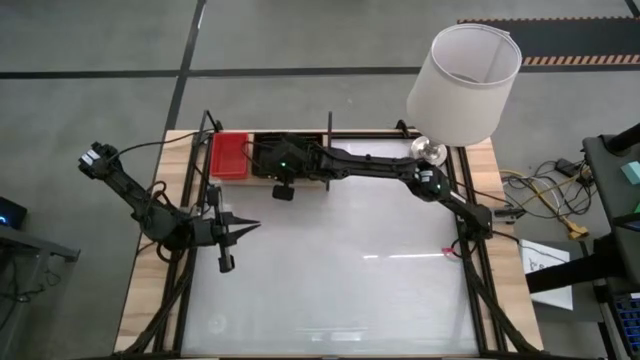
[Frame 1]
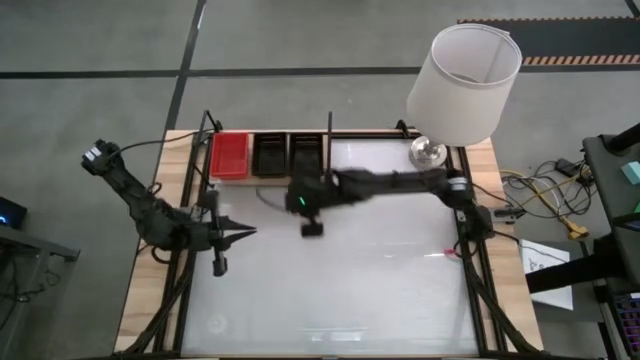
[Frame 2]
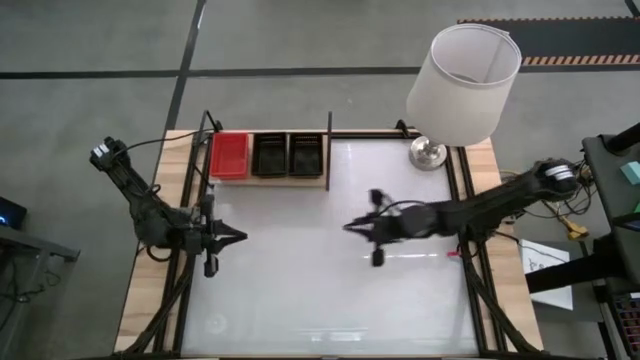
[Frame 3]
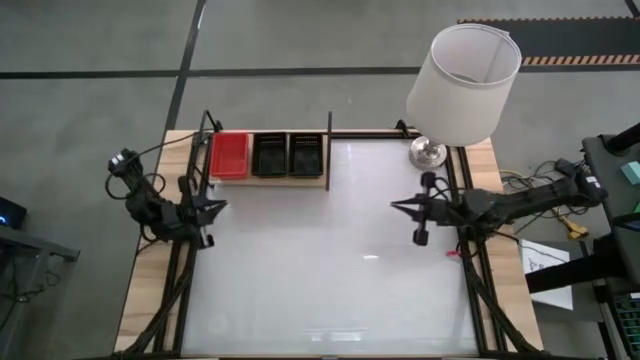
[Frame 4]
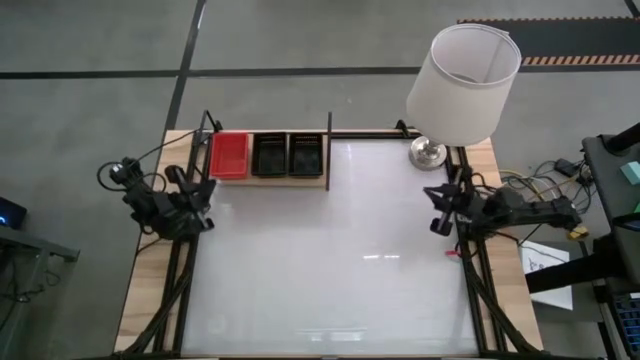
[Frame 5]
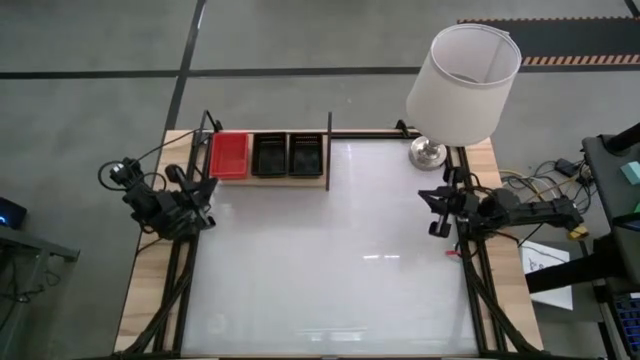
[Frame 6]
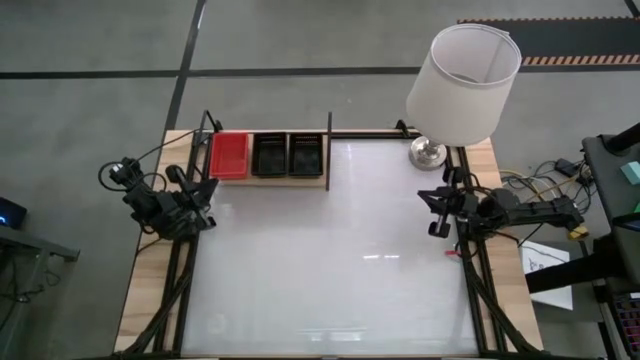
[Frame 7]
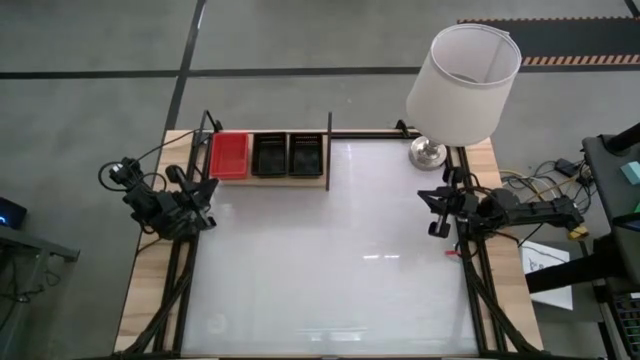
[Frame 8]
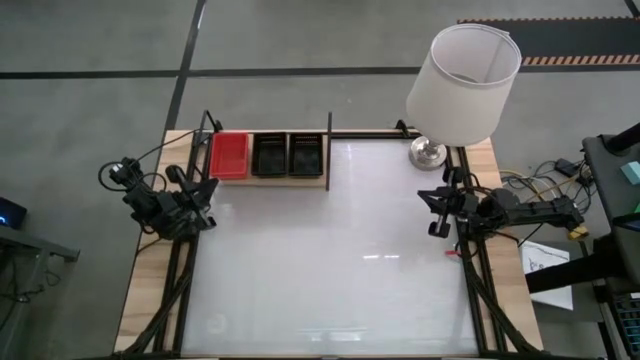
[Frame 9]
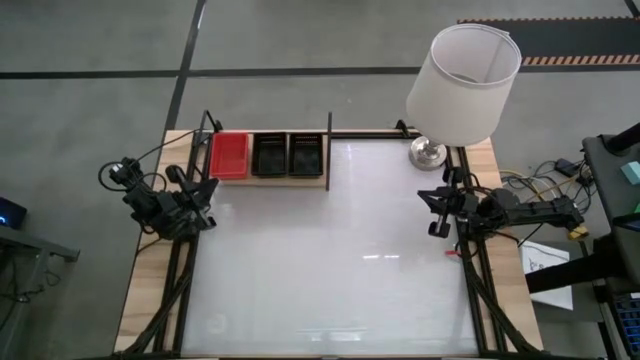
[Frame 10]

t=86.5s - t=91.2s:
Task: Stack baskets on shelf by color
Return to Home Position

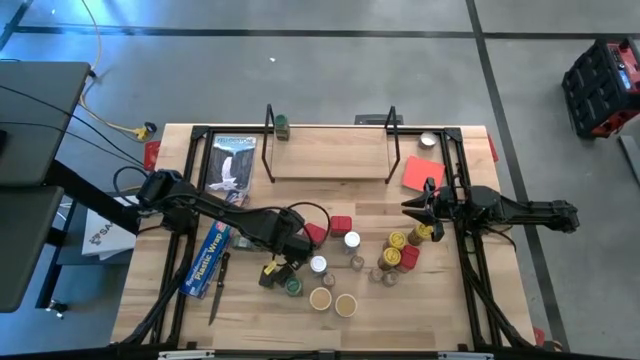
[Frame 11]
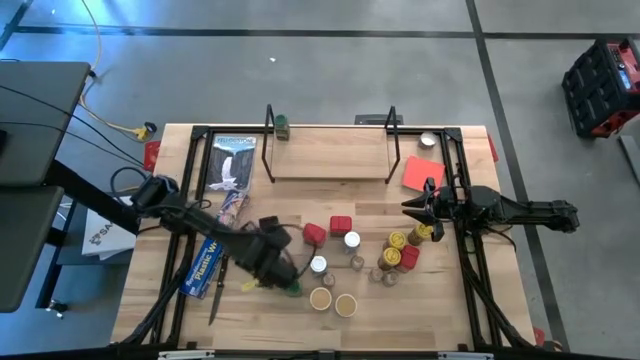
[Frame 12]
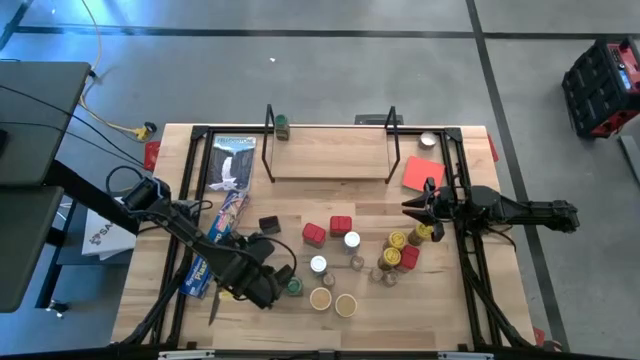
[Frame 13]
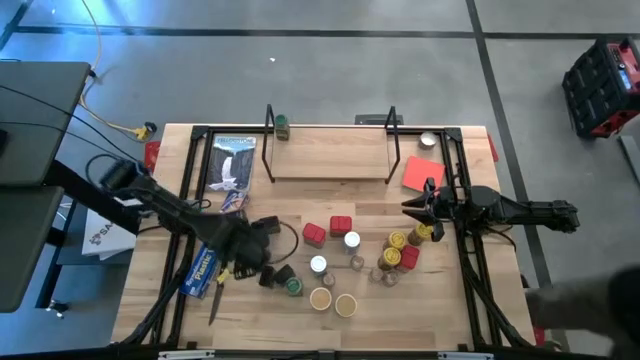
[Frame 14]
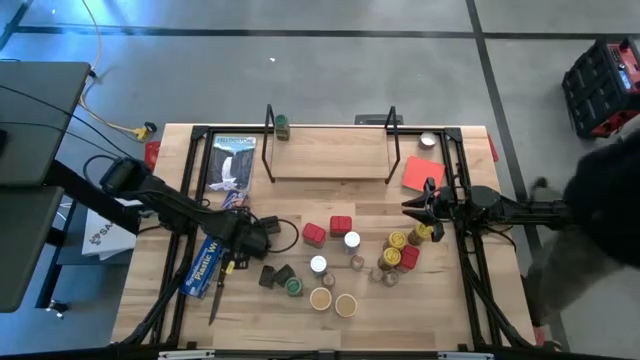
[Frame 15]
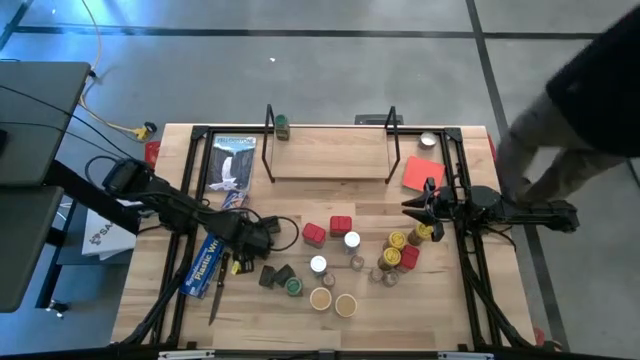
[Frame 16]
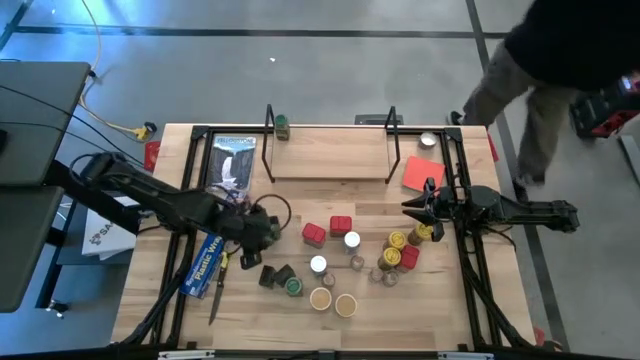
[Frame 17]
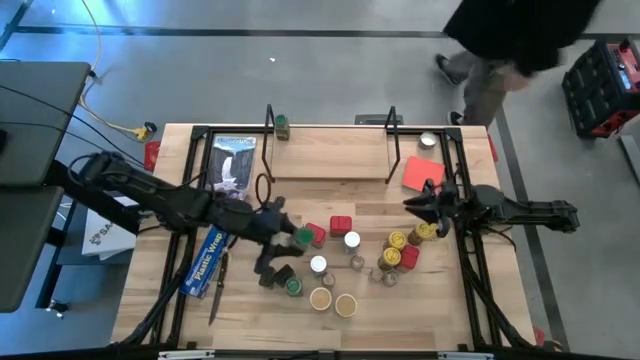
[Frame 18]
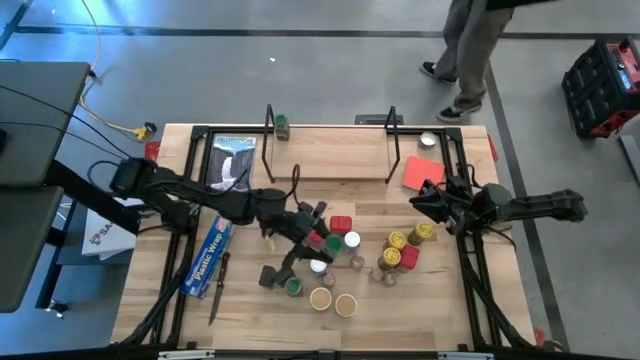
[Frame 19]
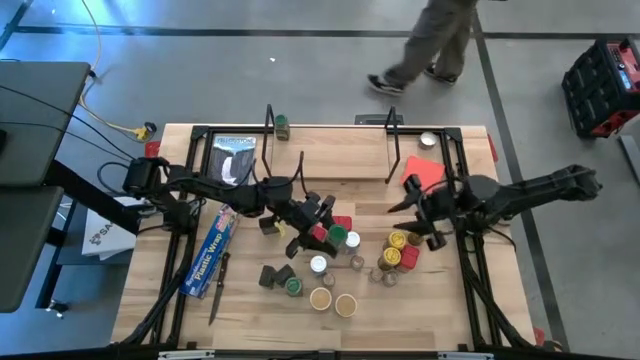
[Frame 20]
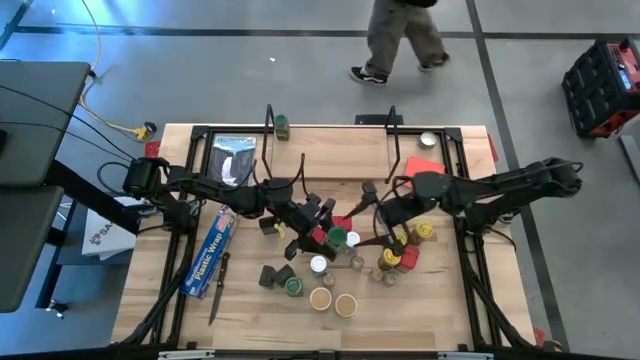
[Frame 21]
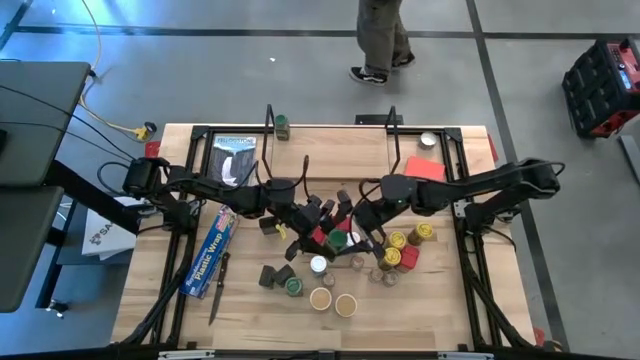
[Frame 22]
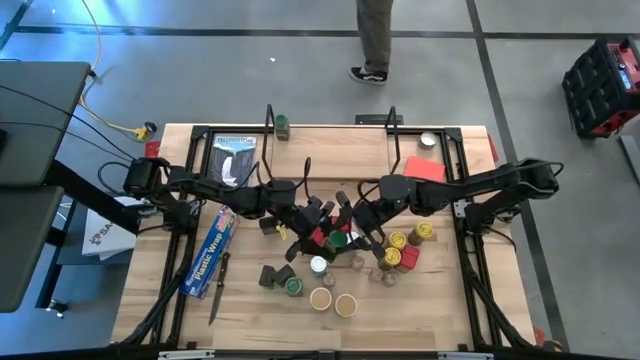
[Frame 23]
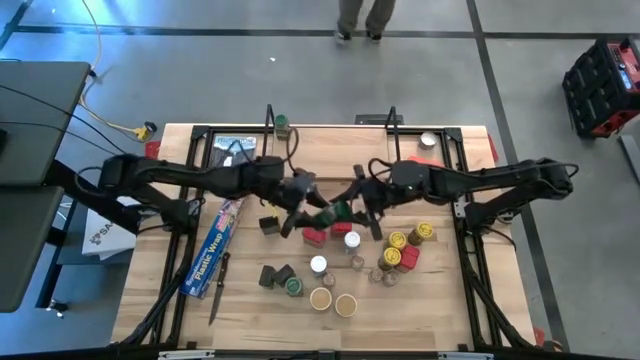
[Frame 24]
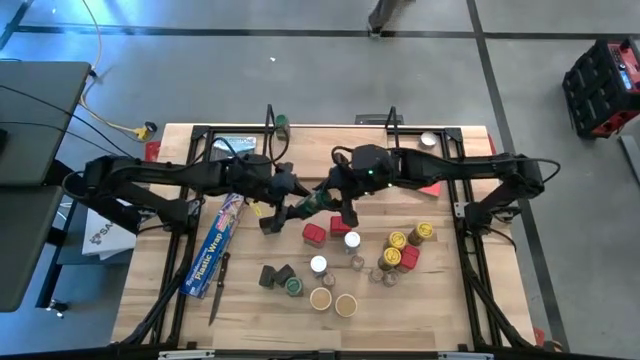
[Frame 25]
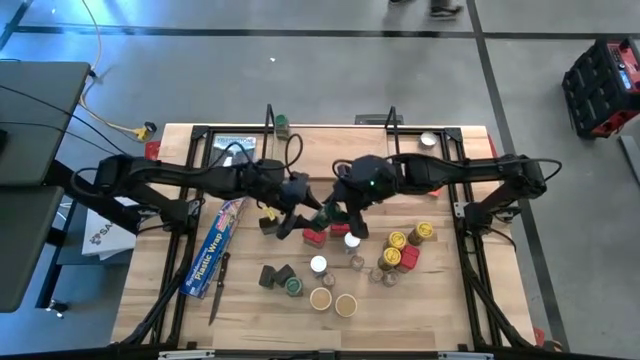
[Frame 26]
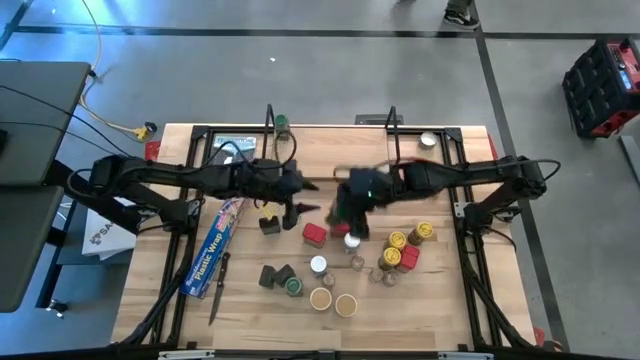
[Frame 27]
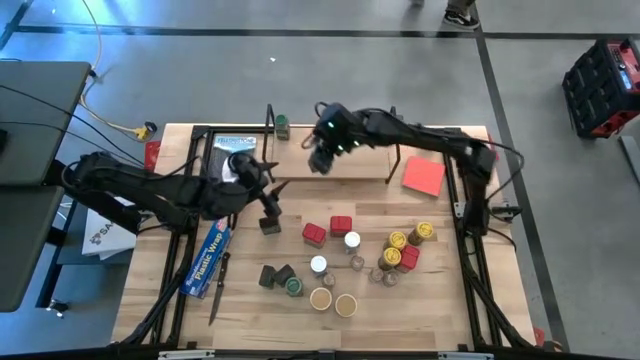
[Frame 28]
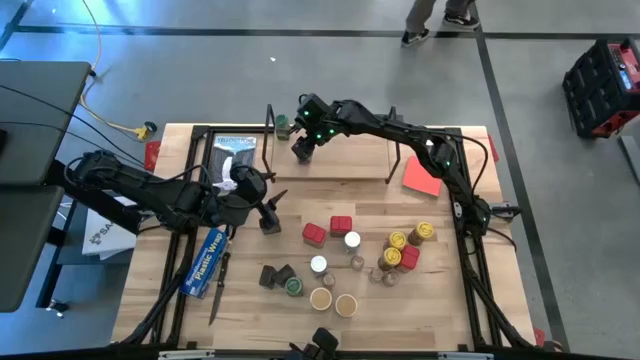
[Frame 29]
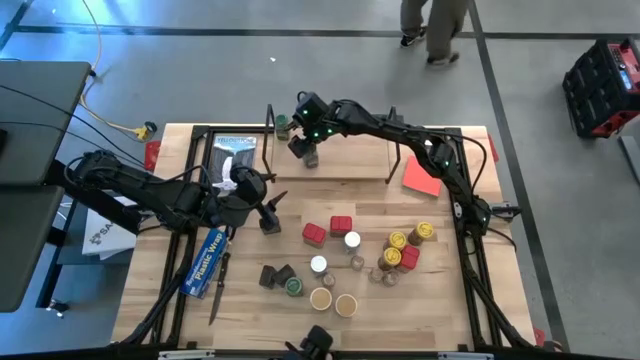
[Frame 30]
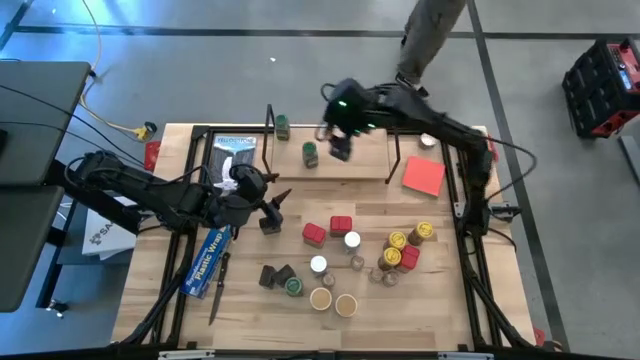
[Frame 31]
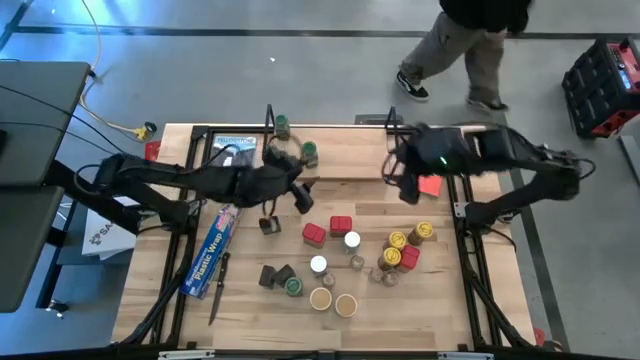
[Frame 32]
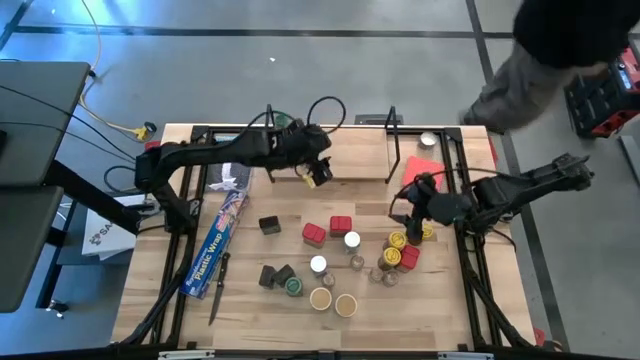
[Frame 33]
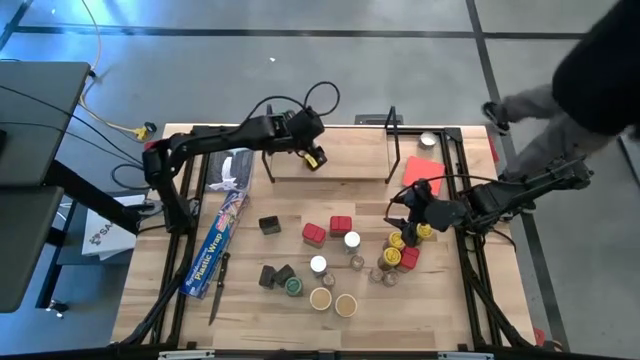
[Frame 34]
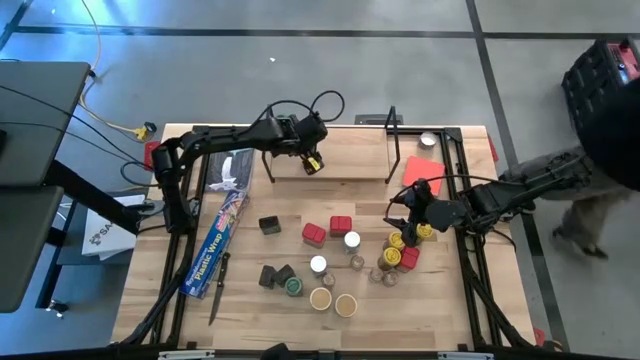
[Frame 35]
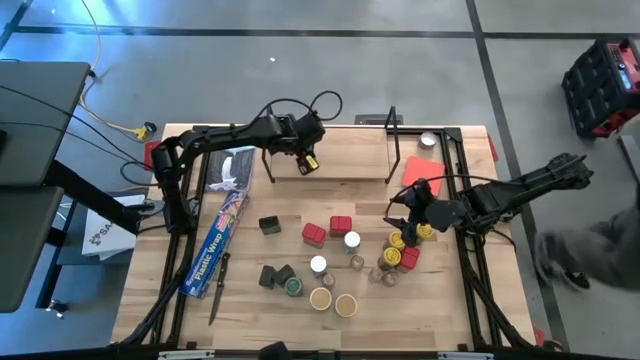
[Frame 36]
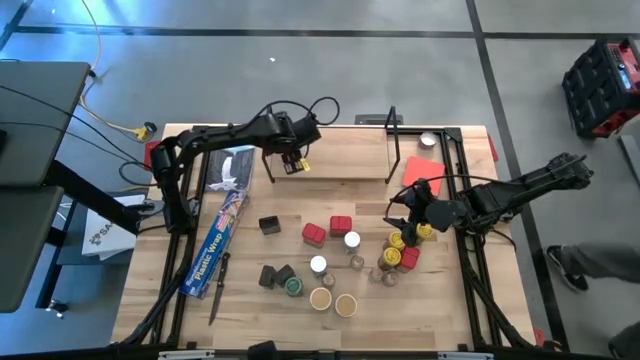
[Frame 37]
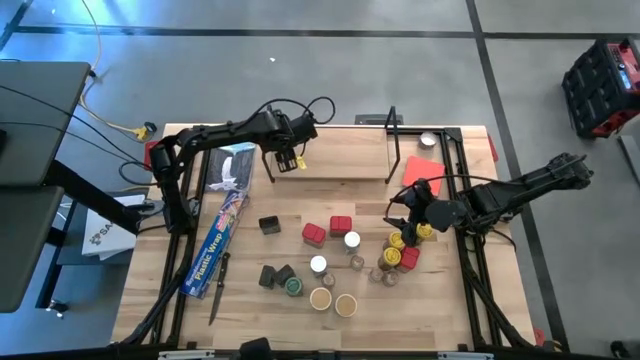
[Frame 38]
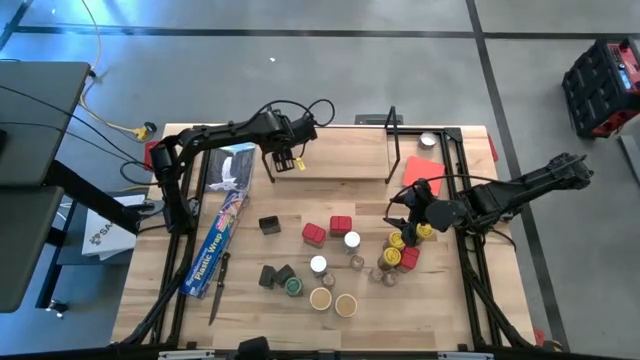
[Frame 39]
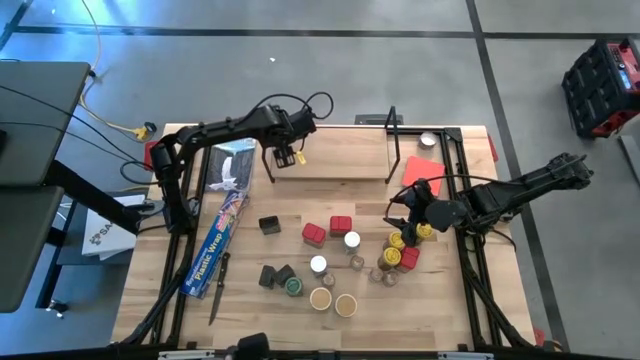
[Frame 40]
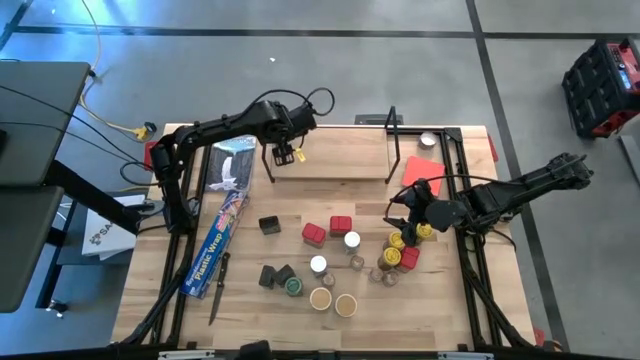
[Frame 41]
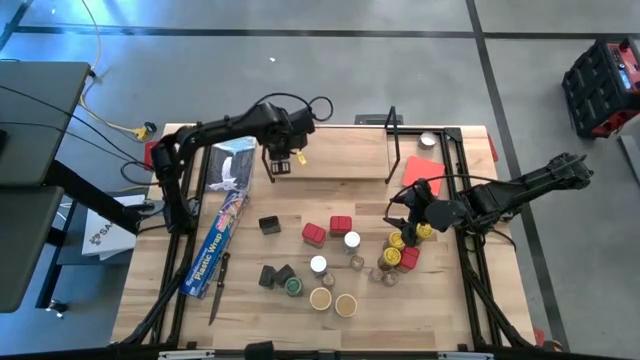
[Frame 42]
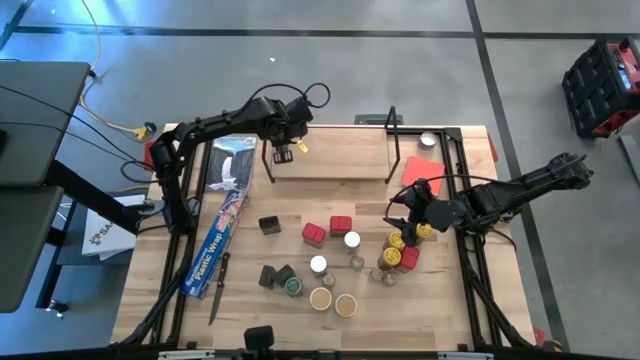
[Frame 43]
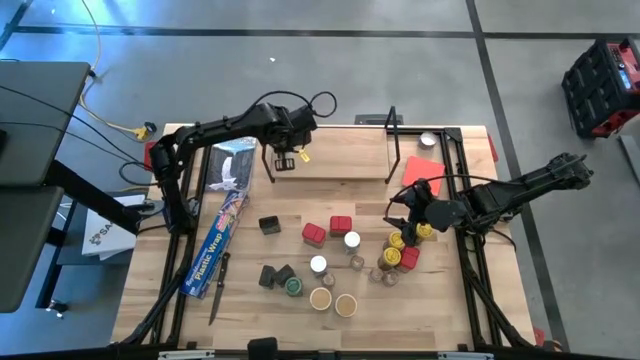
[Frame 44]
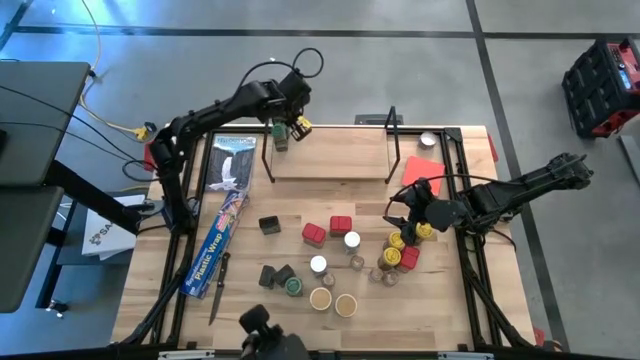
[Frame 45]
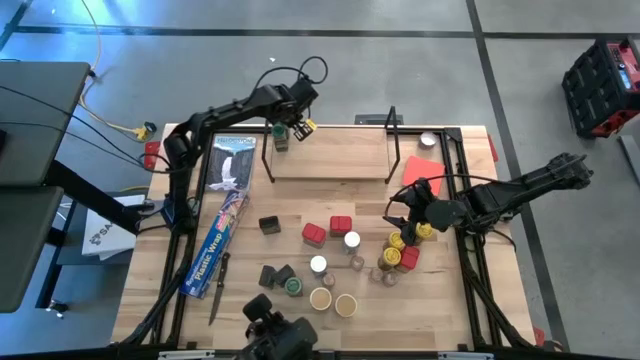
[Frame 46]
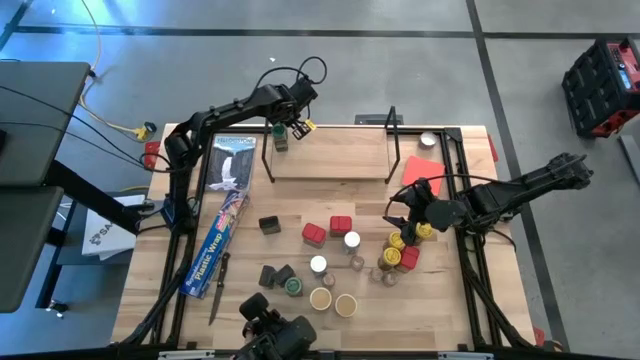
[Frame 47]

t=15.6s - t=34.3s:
Task: Shelf spices
Put the green seasoning bottle on the shelf and align it with the other green seasoning bottle
